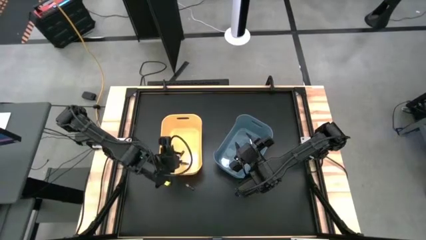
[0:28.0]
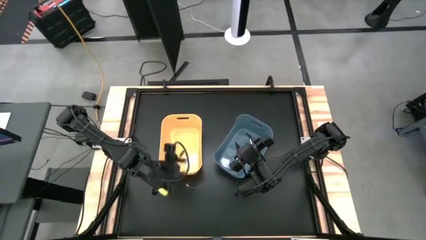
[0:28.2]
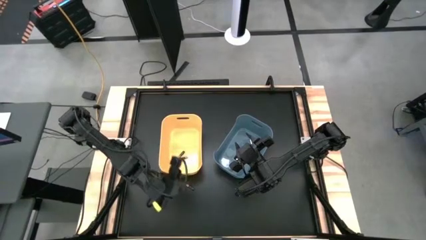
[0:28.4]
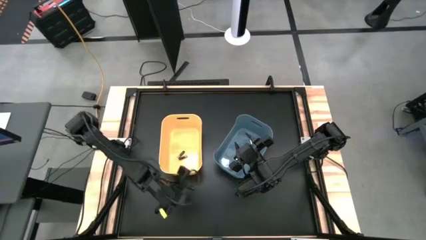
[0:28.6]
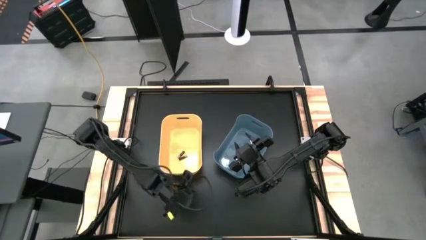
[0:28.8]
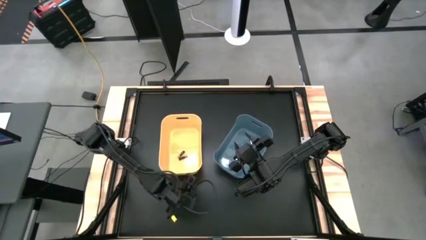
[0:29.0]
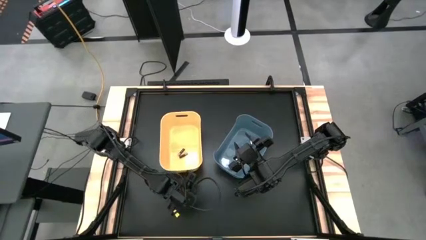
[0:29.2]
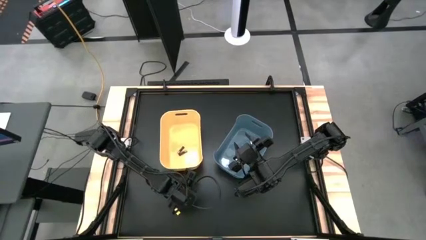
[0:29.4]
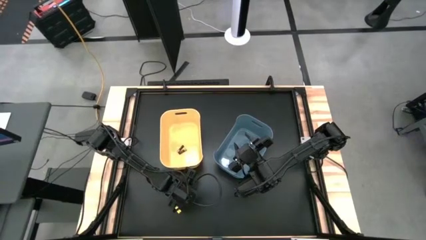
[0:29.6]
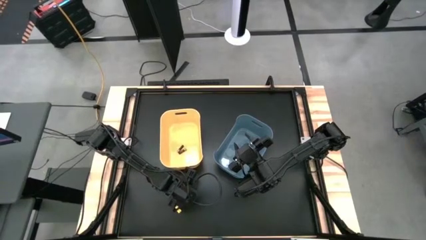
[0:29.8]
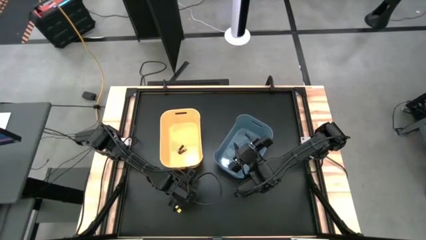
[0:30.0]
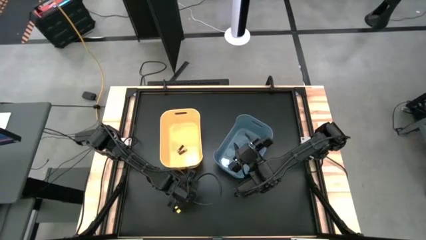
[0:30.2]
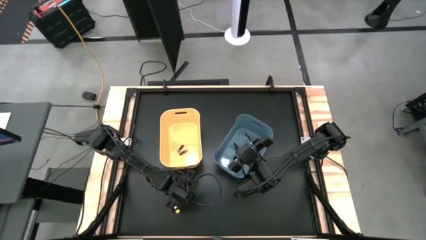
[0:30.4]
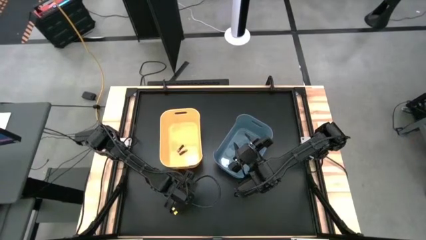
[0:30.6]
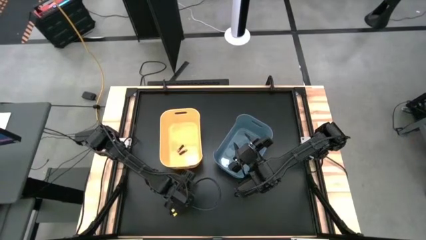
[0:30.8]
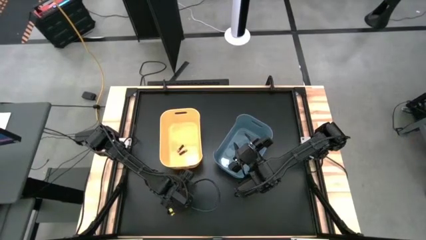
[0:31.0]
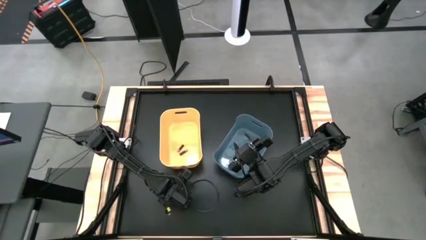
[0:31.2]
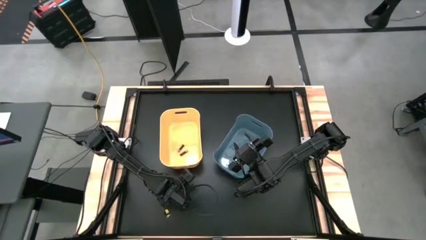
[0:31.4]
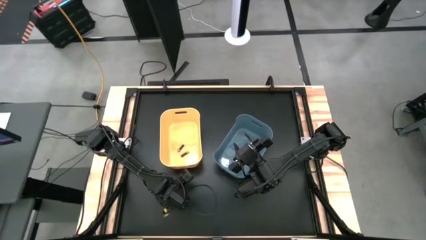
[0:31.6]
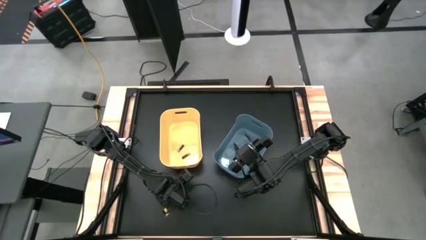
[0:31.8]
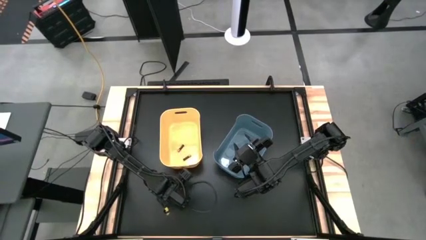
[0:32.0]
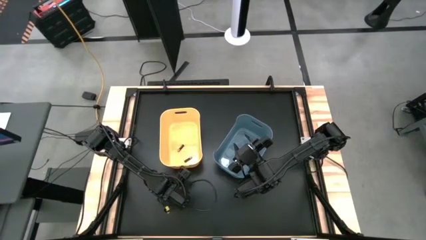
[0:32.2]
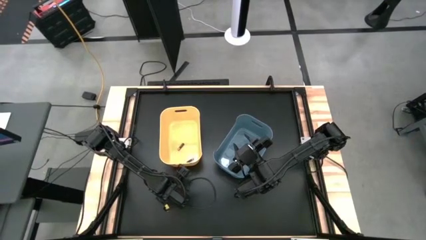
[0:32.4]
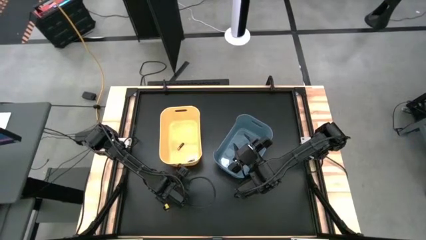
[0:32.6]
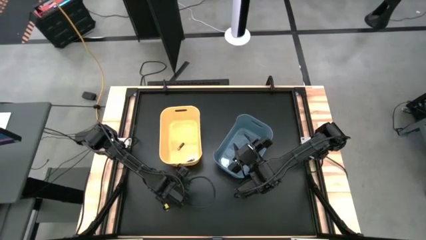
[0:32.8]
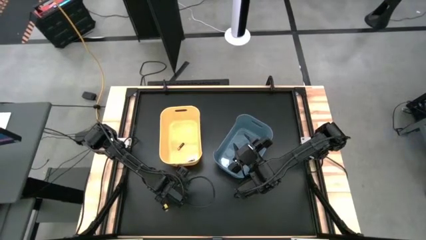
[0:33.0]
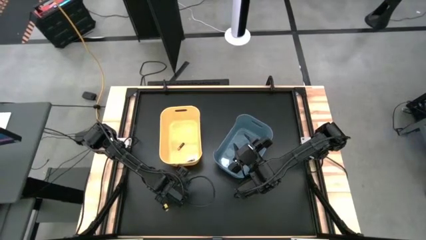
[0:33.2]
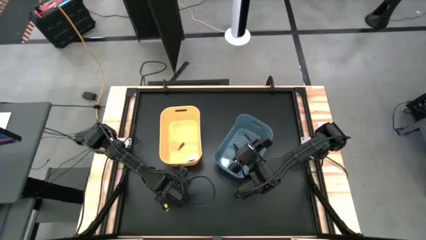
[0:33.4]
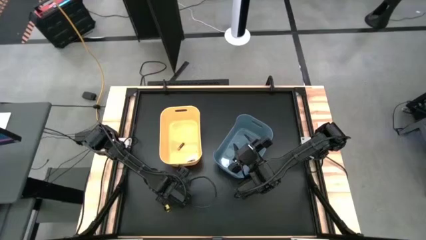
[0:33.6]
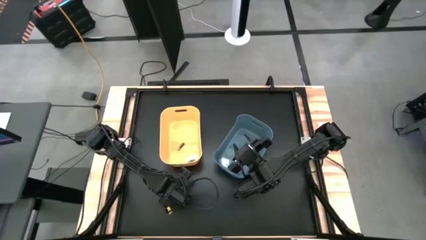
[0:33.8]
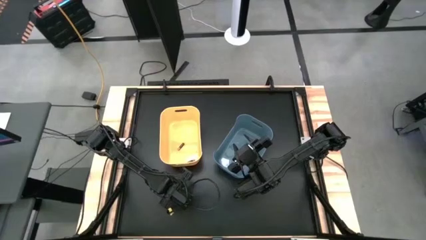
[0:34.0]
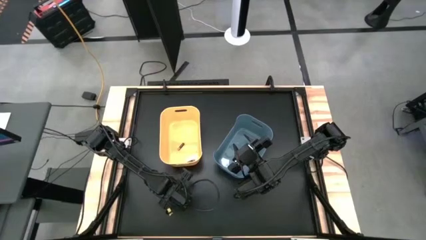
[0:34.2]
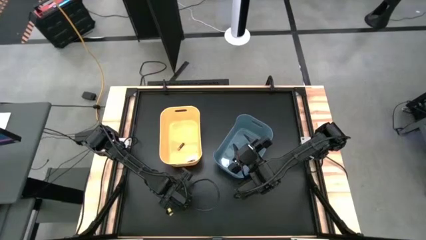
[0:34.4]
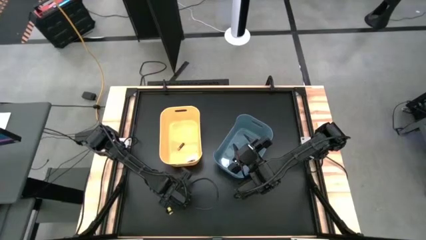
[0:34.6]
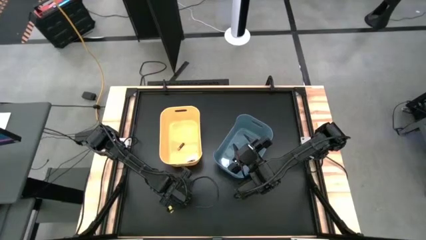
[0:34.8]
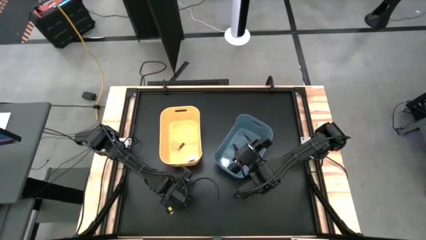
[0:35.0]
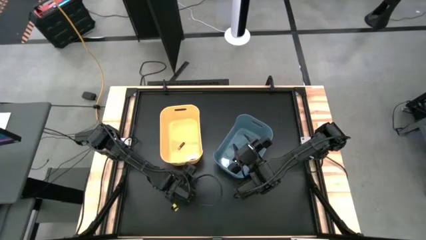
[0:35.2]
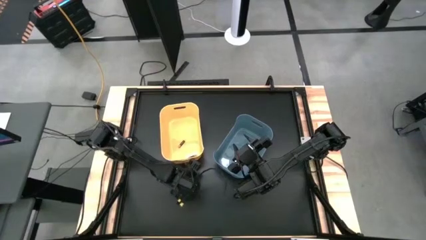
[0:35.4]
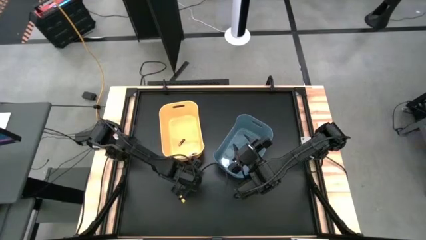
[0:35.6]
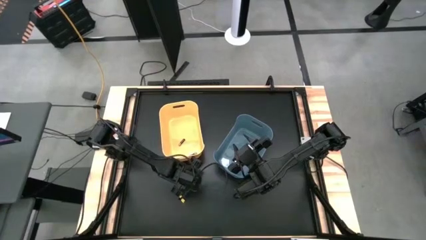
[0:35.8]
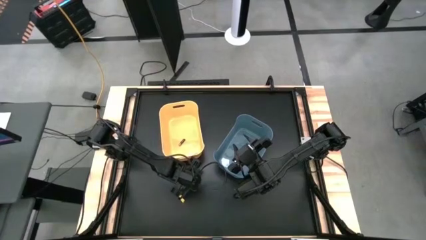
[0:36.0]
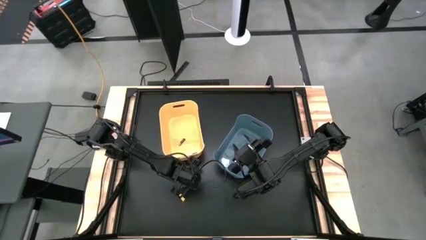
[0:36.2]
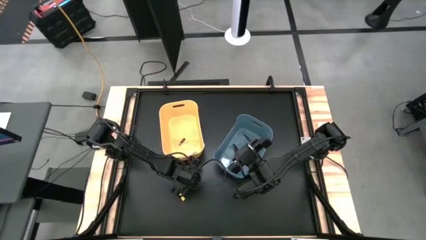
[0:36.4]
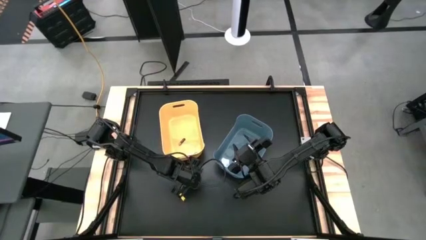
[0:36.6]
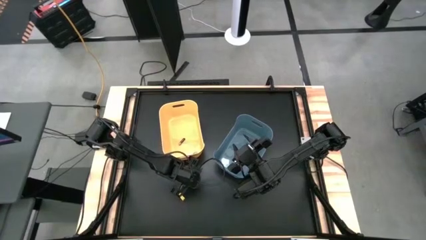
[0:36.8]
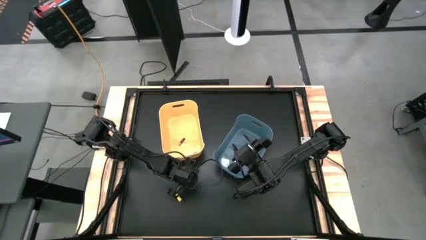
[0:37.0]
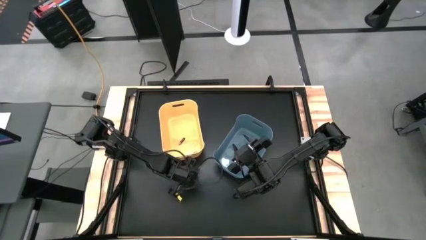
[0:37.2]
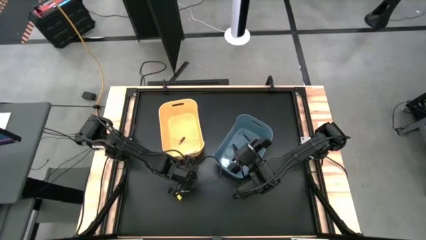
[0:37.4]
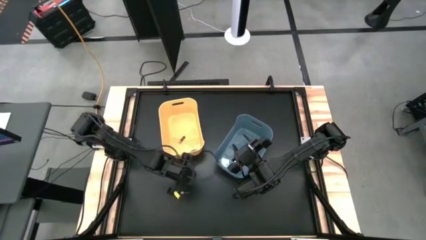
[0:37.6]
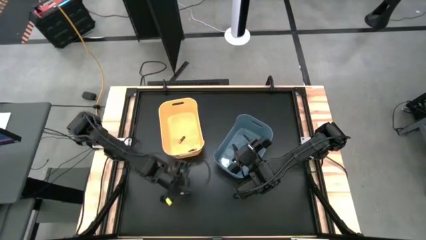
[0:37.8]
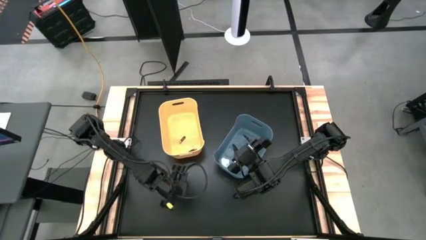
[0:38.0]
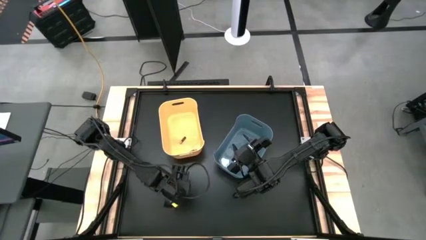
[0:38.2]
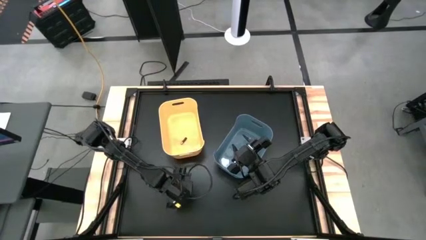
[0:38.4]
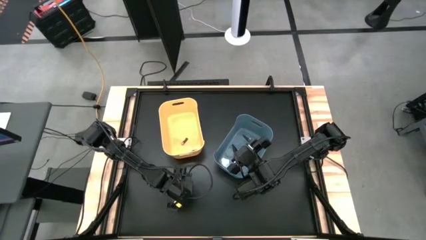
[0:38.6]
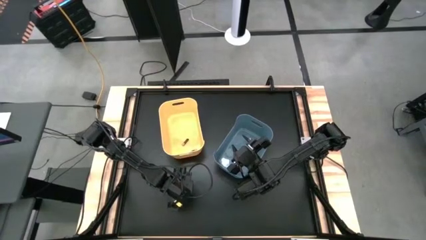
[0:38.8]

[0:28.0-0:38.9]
Task: Sort batteries
Put the black battery into the yellow bin

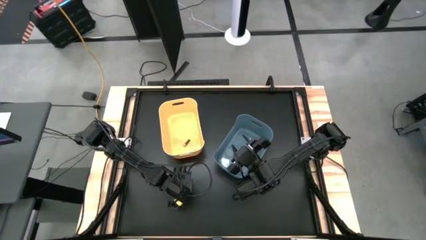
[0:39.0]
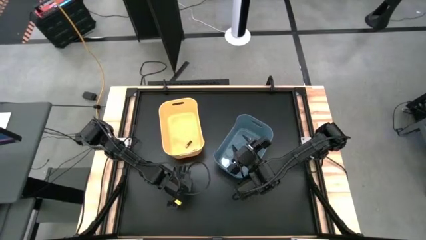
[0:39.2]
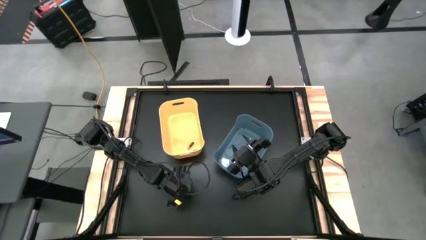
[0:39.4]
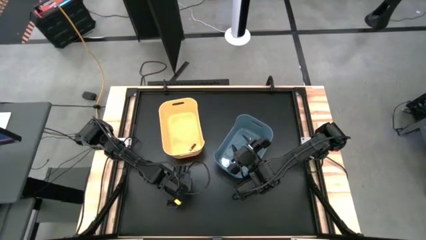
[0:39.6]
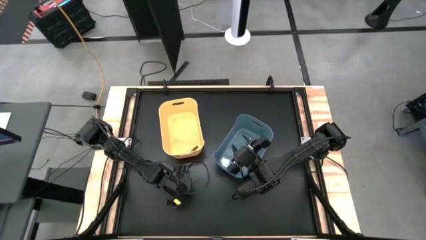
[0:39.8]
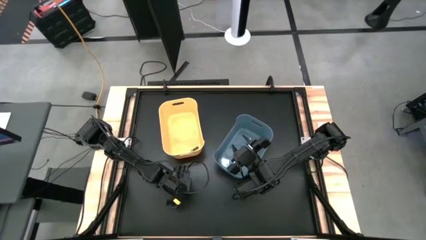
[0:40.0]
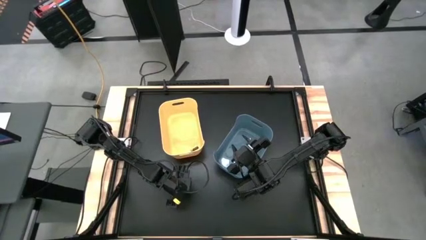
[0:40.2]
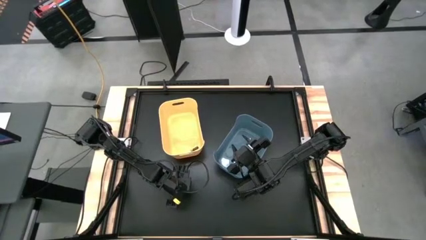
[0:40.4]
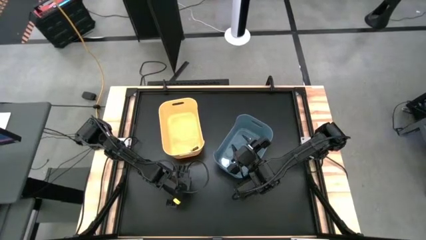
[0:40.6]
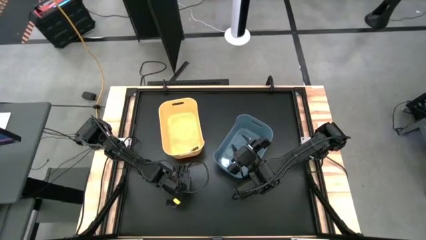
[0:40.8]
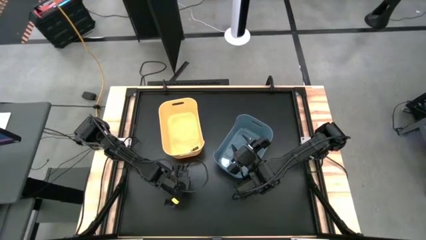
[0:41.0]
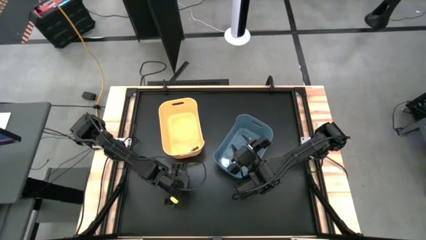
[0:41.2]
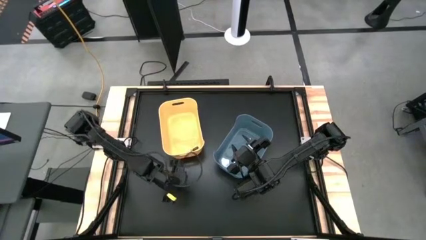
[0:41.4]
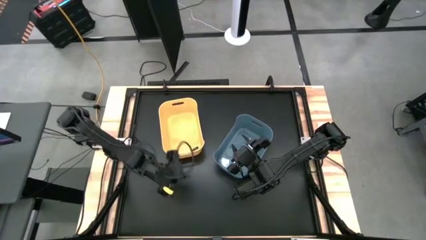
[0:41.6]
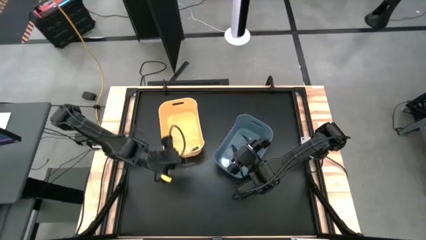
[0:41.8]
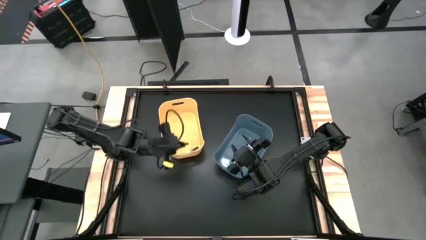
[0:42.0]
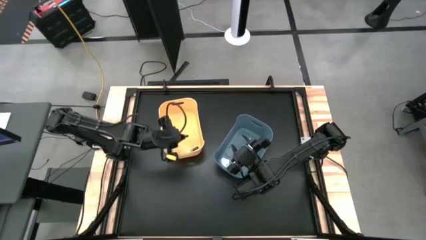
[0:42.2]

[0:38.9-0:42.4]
Put the black battery into the yellow bin

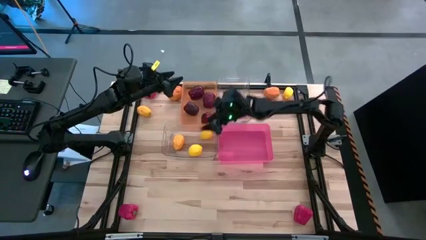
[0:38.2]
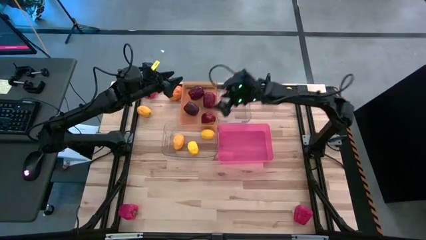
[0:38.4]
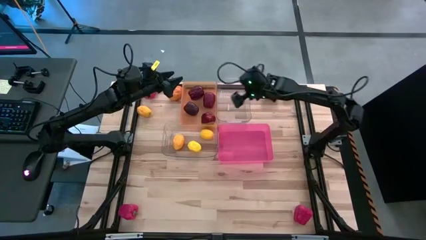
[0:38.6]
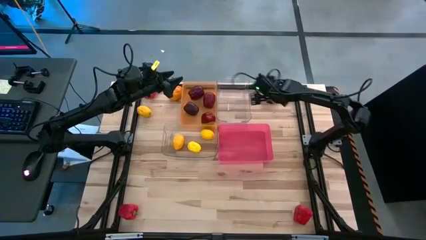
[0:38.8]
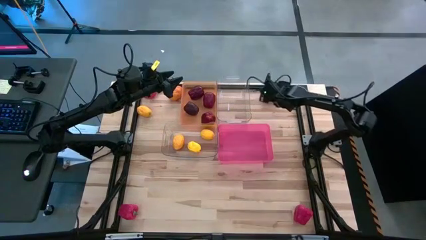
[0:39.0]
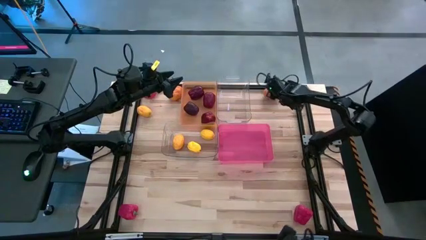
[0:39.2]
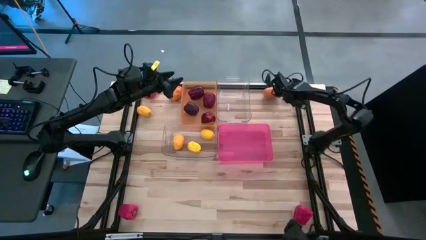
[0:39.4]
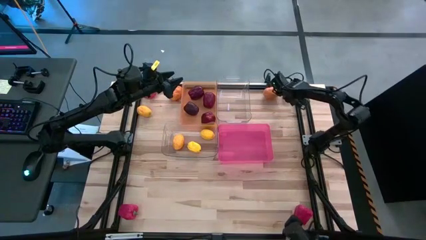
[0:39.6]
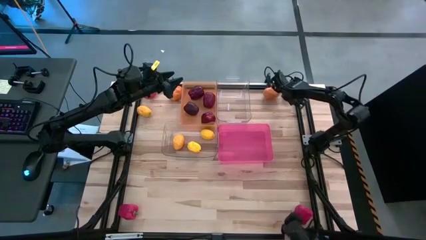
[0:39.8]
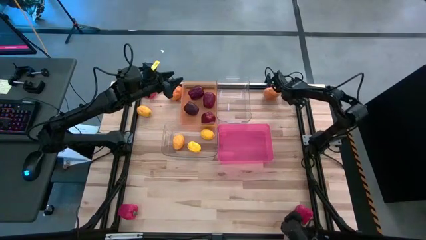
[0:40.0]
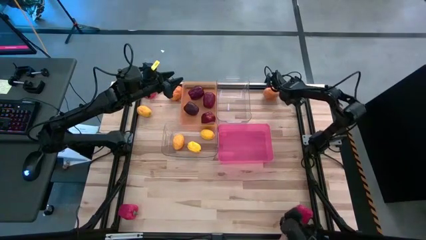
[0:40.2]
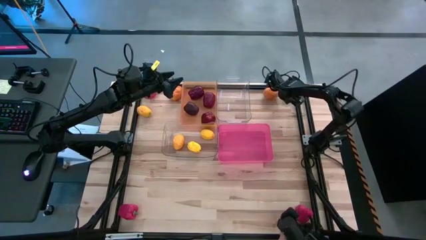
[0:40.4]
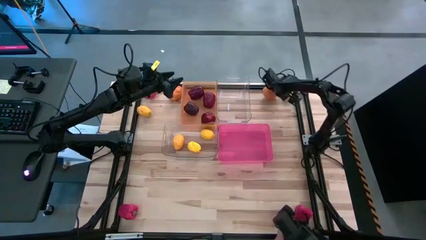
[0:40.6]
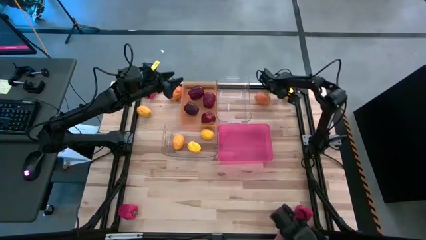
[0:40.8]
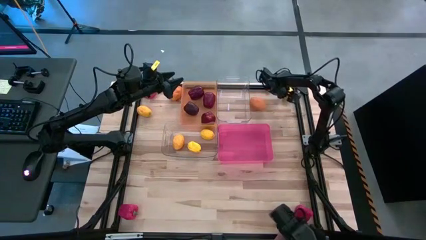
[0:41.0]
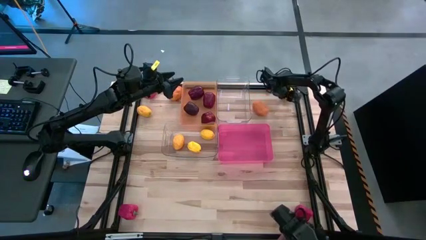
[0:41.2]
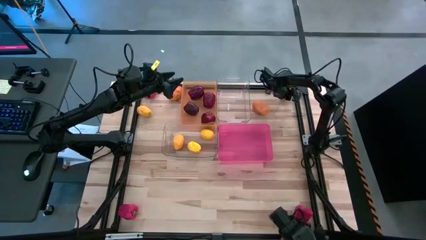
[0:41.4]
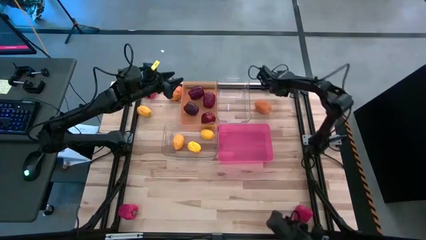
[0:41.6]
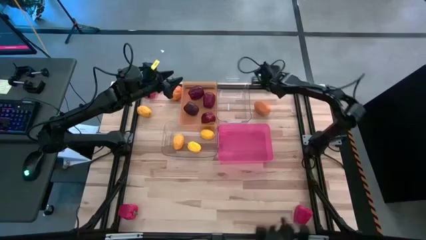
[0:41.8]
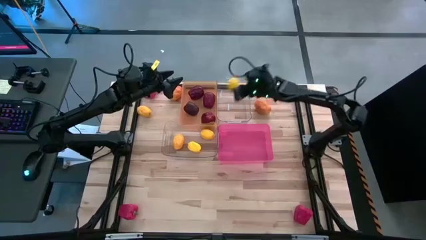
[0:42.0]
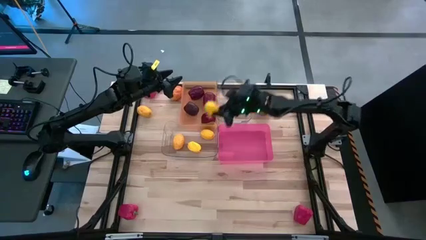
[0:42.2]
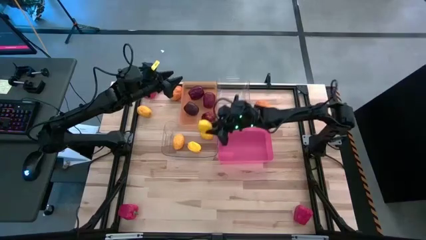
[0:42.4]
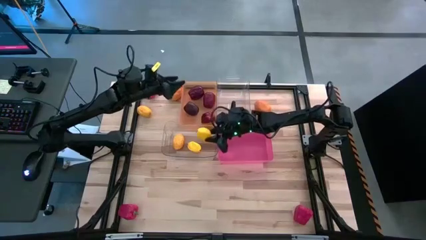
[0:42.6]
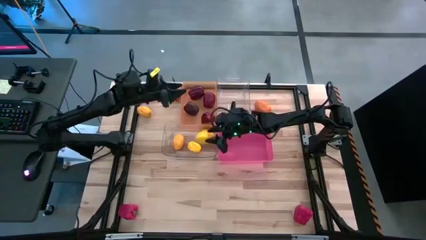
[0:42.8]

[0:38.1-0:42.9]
Task: Sort produce into baskets
Put the yellow lemon into the bottom transparent bin
